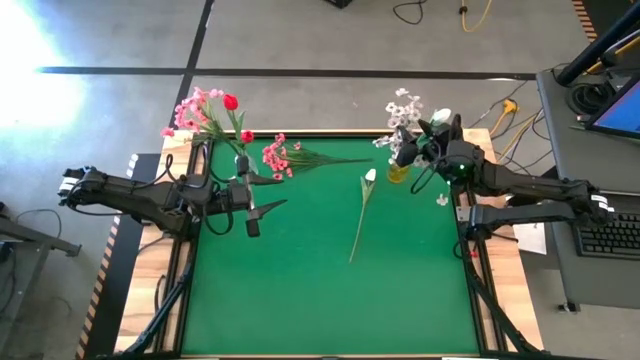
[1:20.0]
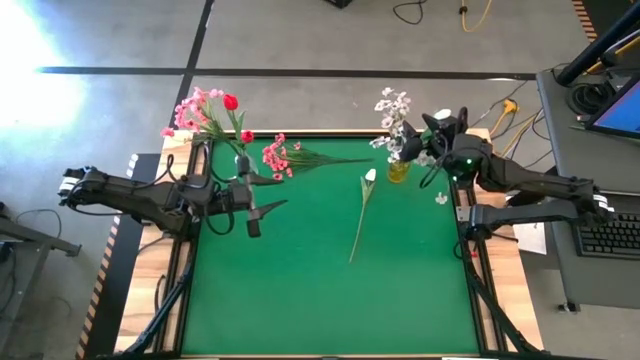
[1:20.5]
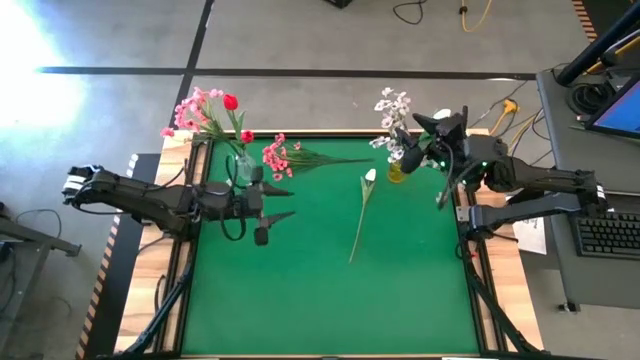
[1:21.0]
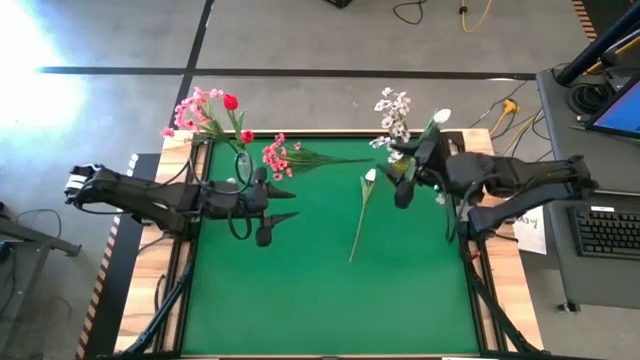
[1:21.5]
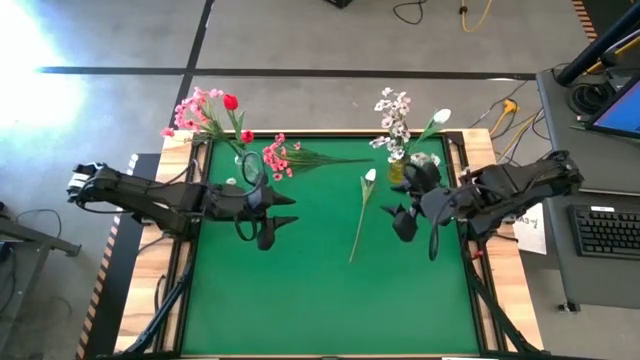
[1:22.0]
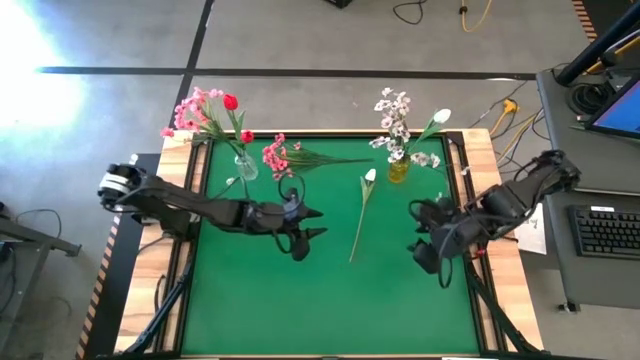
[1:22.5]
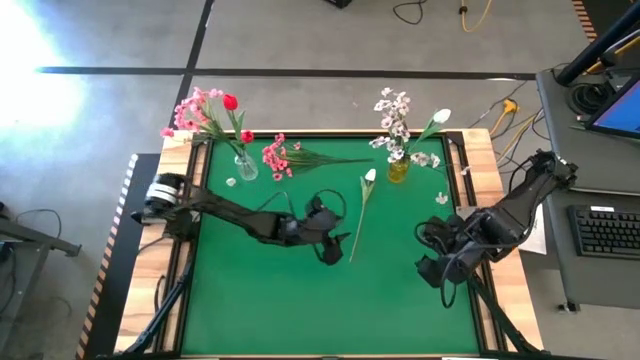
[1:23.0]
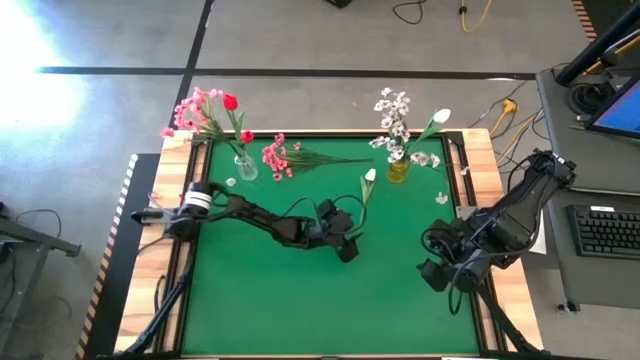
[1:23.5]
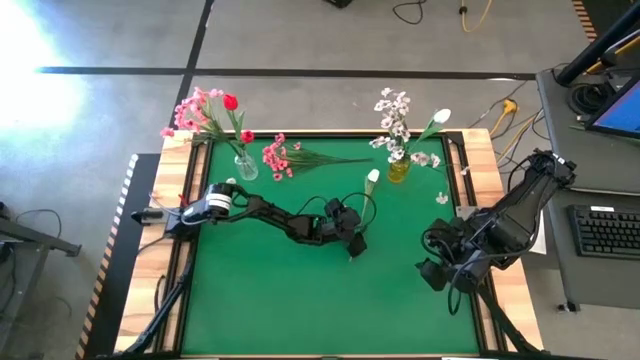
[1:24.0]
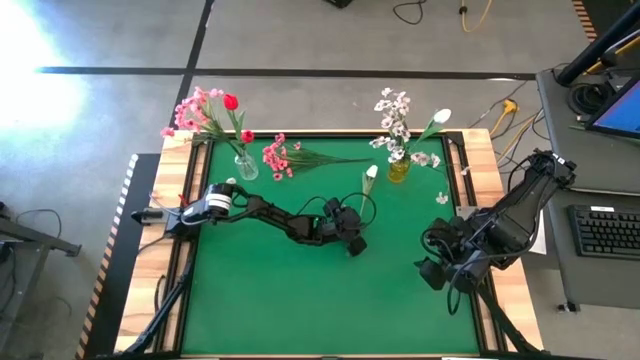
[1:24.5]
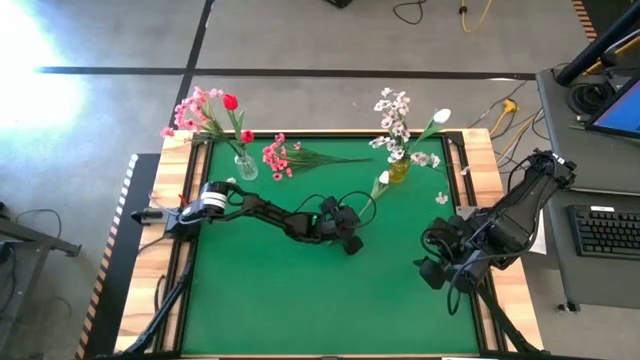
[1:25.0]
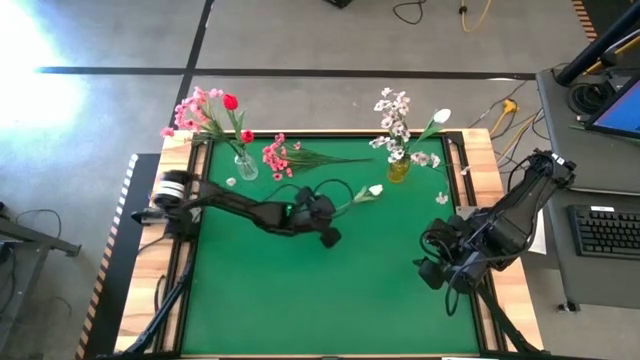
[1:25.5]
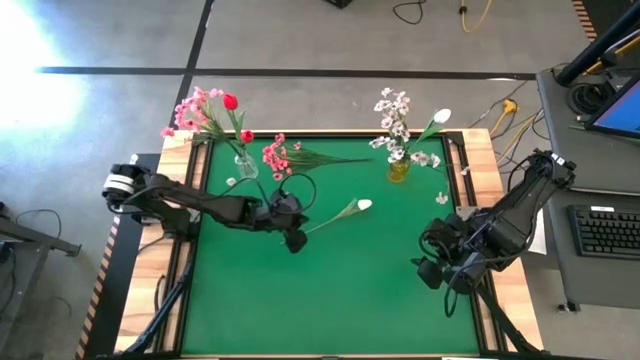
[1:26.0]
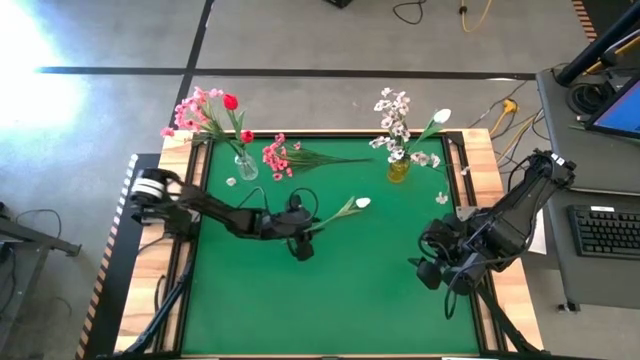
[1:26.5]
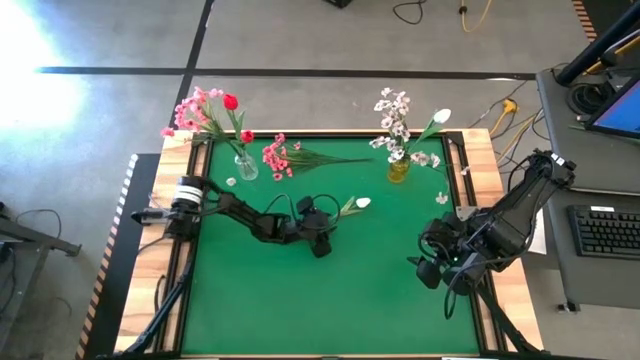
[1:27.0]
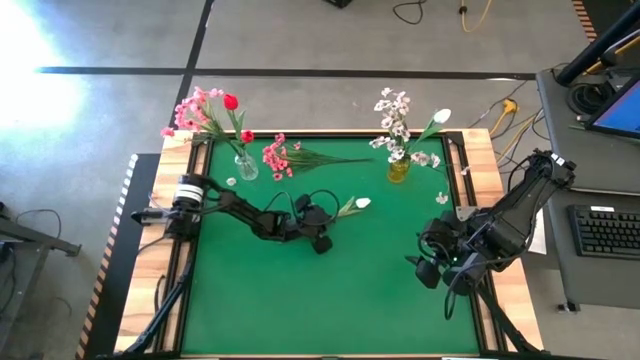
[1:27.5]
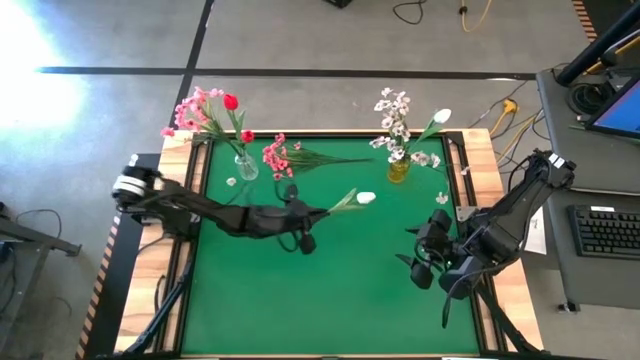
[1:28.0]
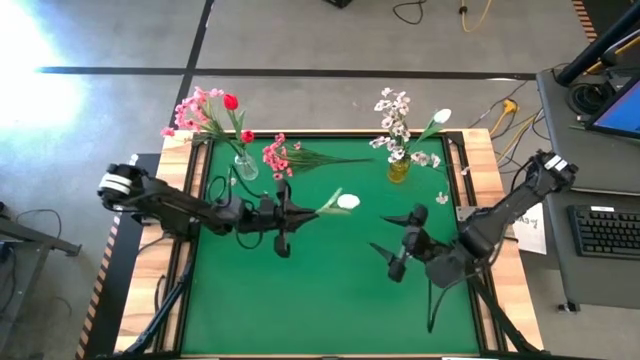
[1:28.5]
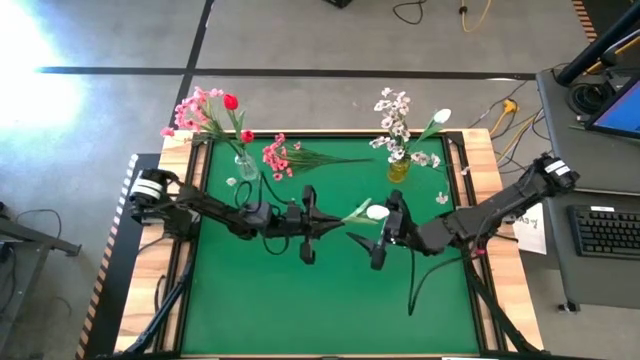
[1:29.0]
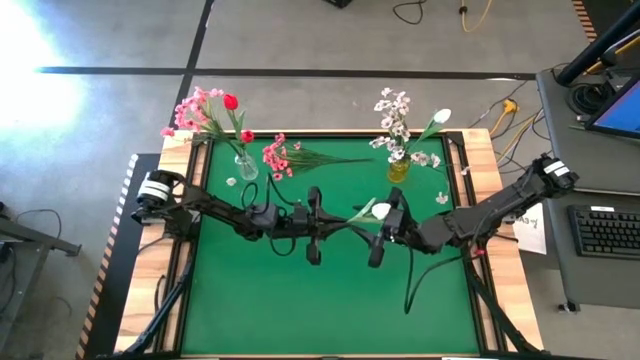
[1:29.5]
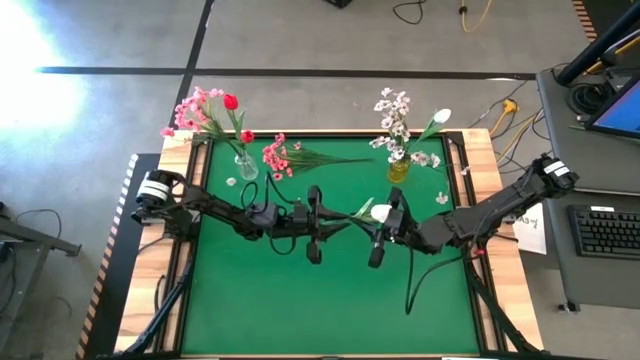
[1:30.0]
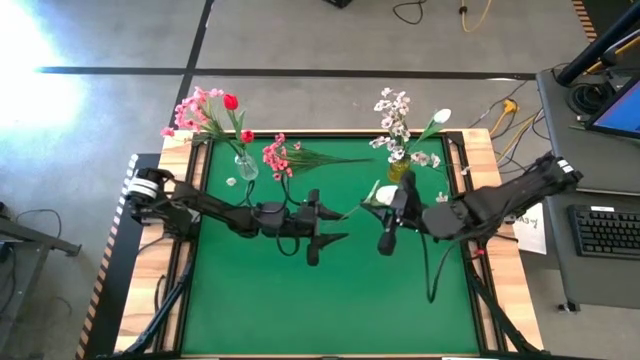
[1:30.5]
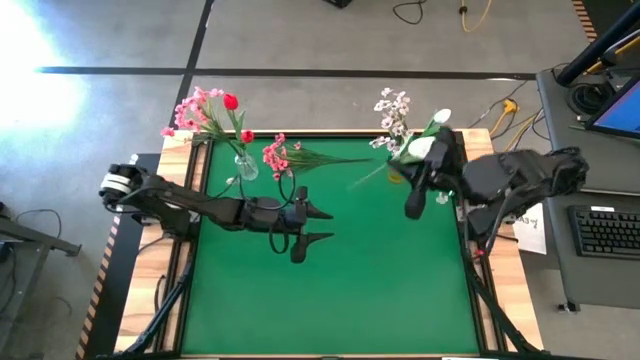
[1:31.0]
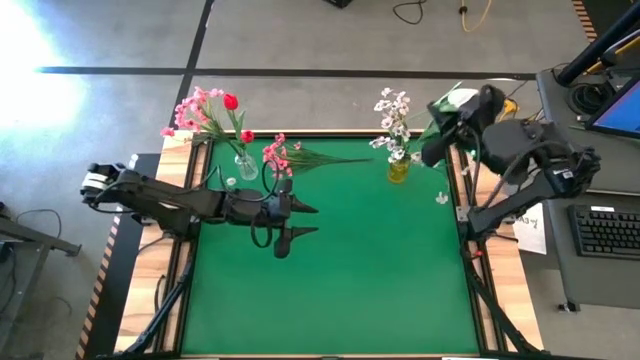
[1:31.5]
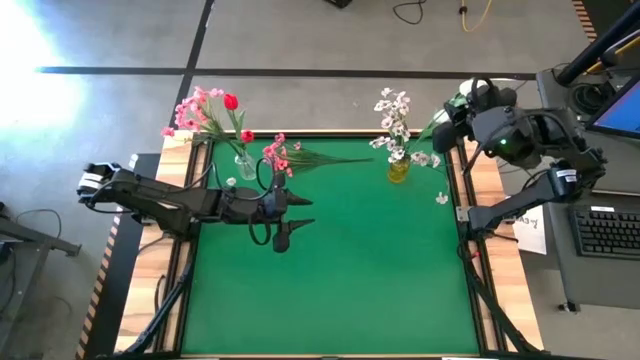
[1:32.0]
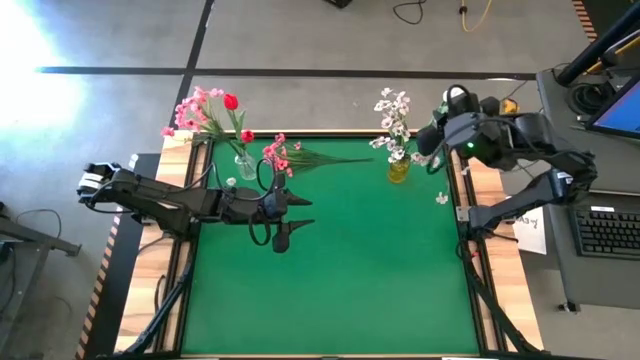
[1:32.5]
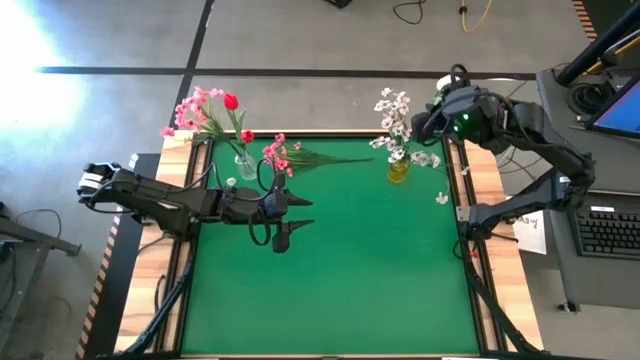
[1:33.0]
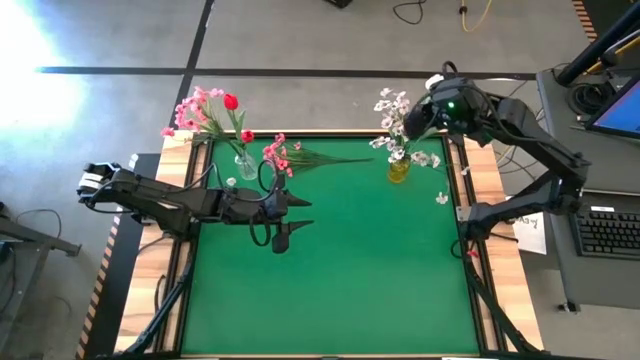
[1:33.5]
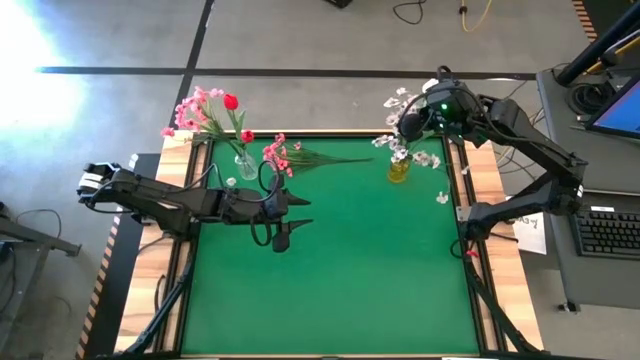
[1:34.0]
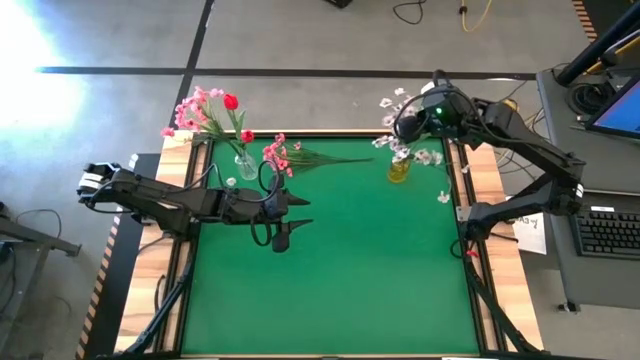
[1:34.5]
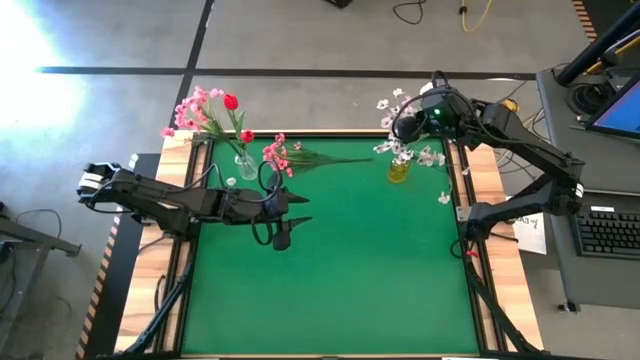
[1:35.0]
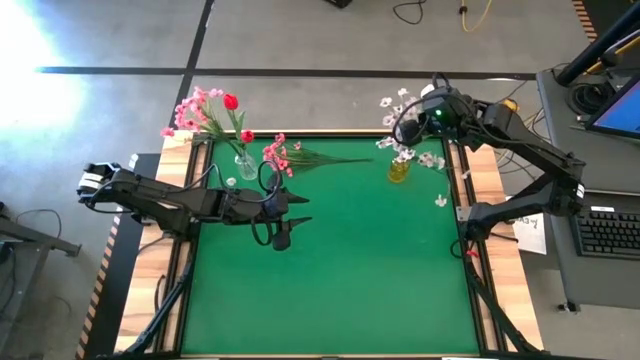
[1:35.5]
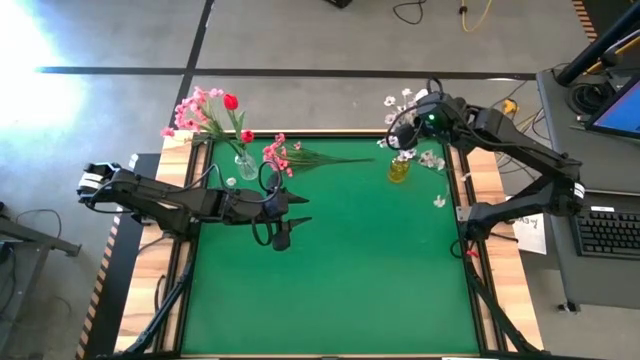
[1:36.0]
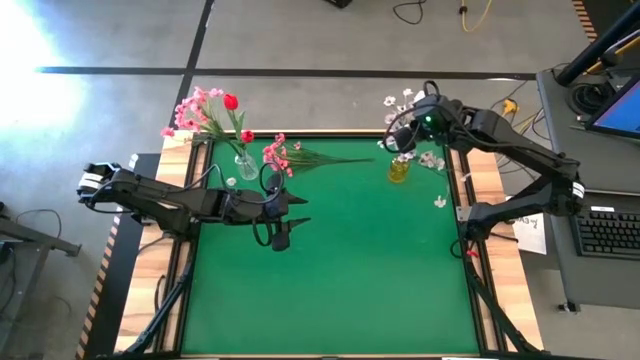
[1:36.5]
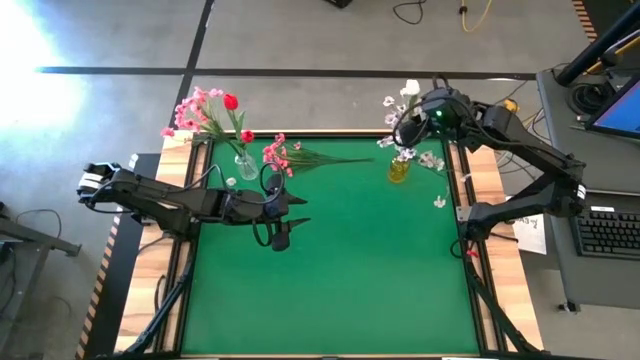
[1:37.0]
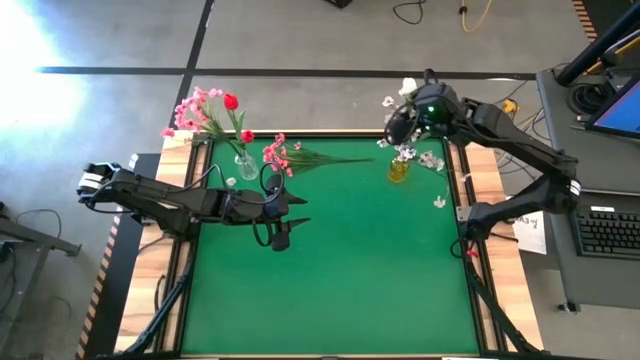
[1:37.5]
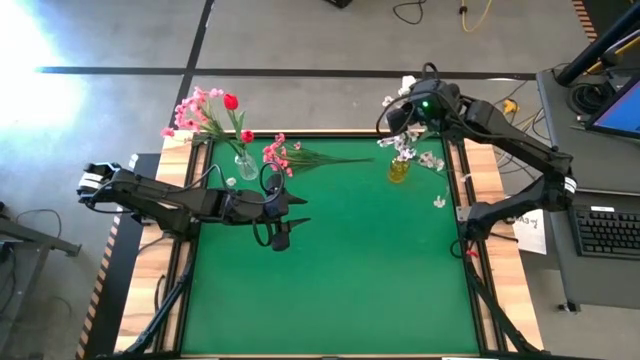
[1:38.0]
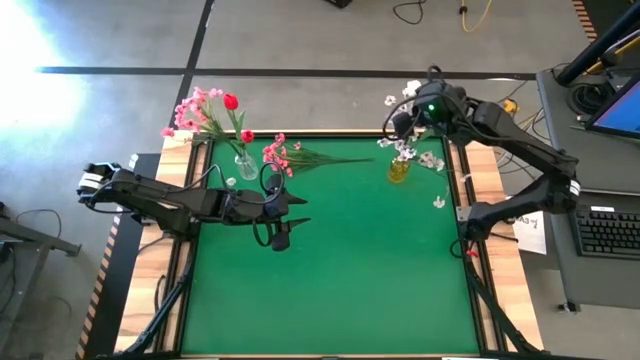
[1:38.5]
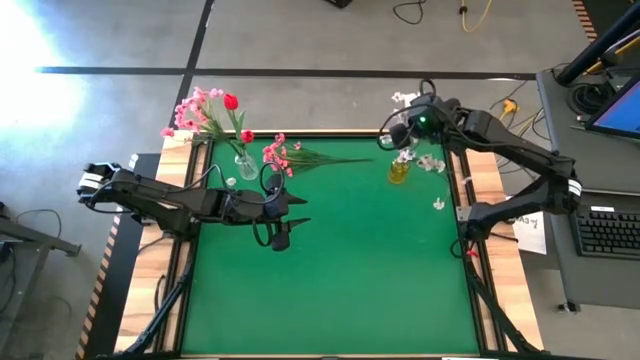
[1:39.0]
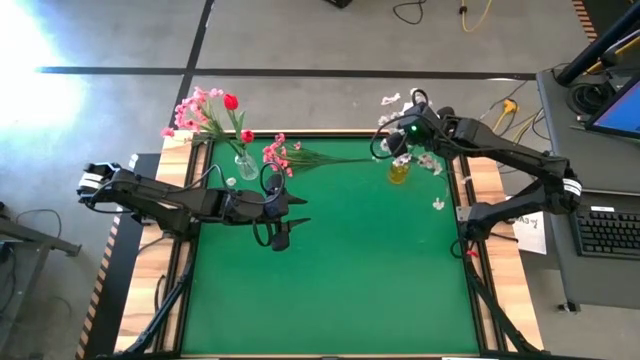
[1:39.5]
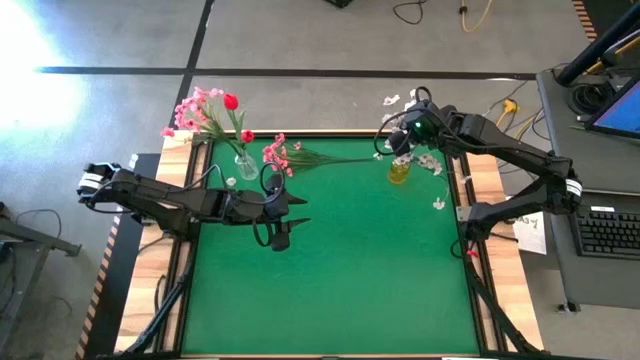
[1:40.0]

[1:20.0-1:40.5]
Task: Sort flowers into vase by color
Put the white tulip into the yellow vase
